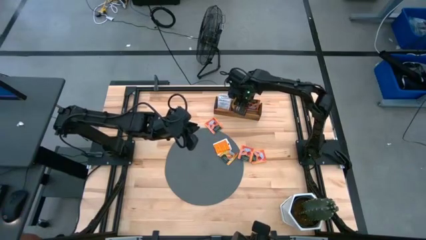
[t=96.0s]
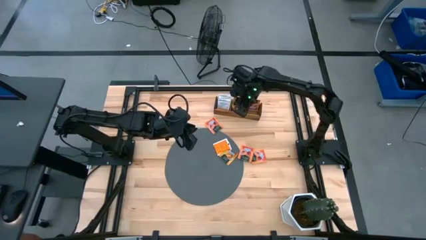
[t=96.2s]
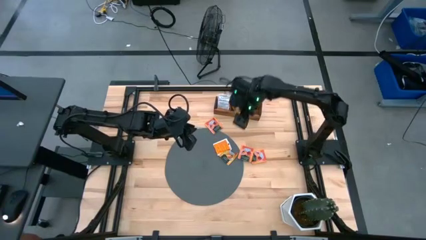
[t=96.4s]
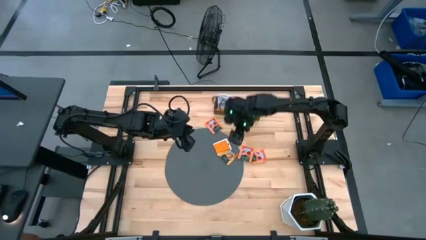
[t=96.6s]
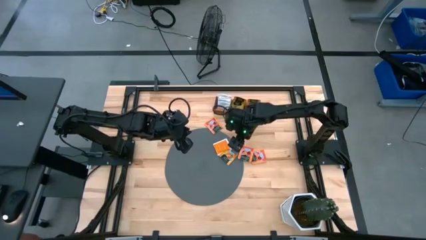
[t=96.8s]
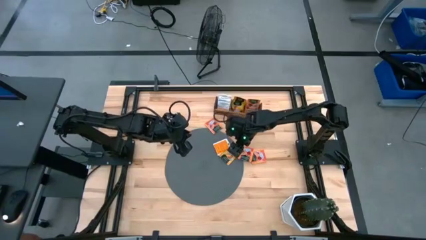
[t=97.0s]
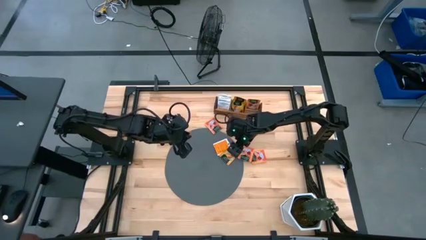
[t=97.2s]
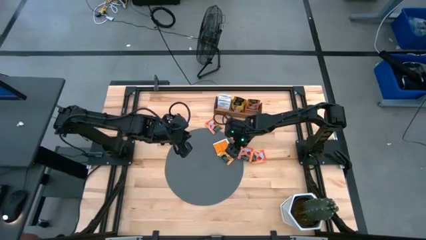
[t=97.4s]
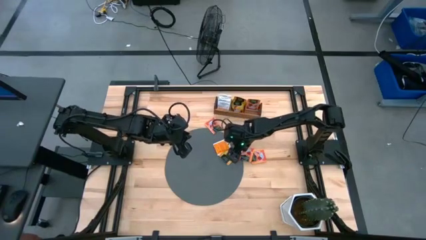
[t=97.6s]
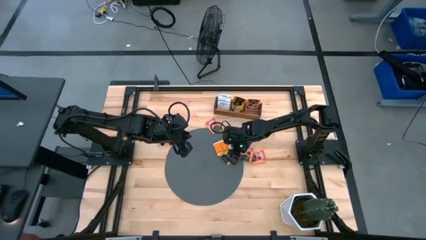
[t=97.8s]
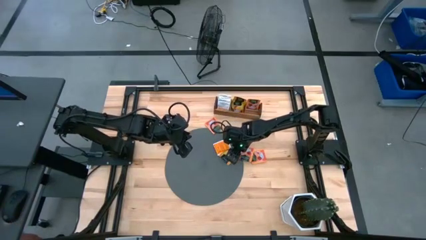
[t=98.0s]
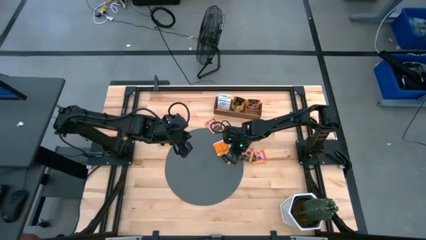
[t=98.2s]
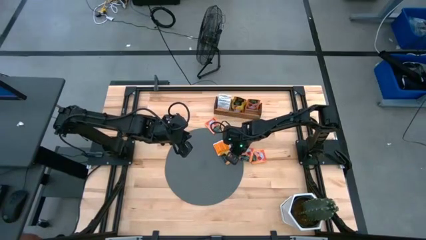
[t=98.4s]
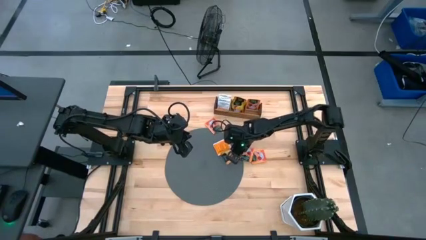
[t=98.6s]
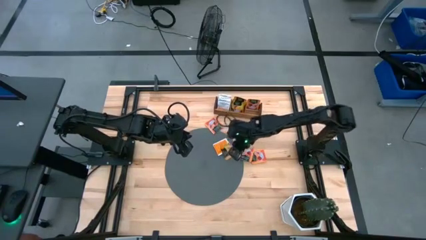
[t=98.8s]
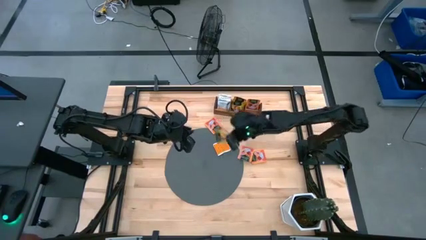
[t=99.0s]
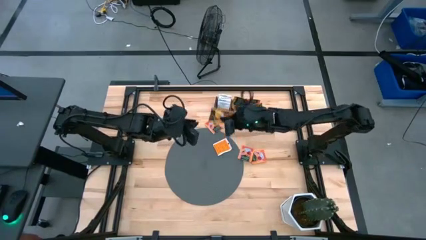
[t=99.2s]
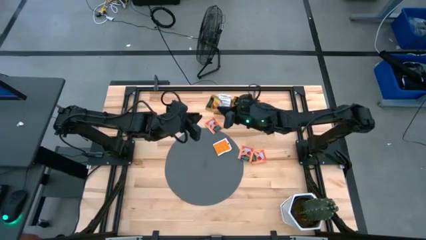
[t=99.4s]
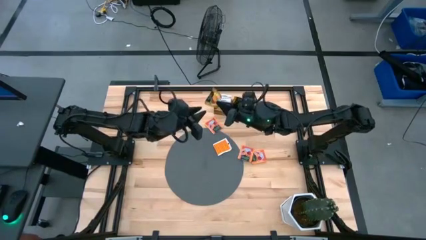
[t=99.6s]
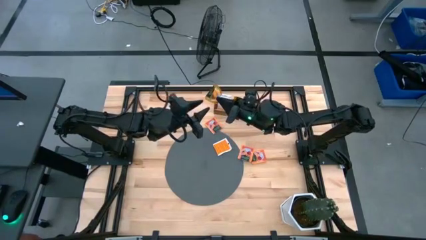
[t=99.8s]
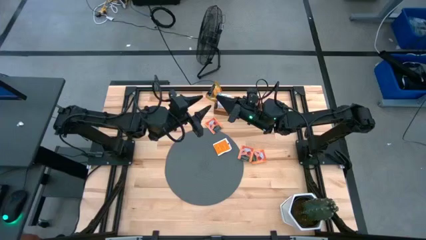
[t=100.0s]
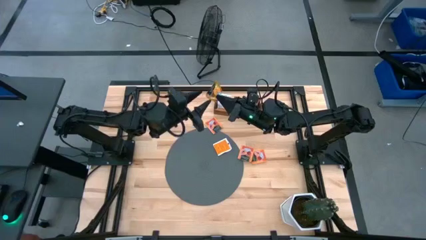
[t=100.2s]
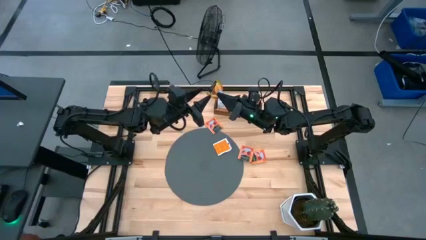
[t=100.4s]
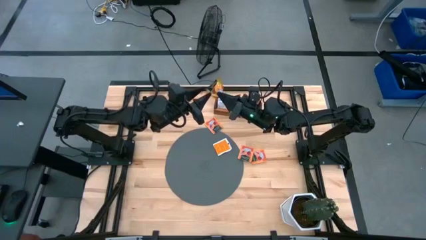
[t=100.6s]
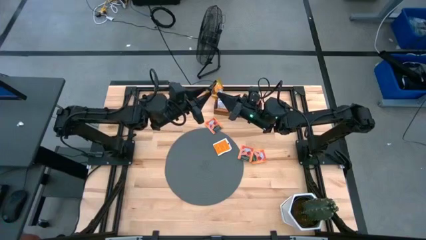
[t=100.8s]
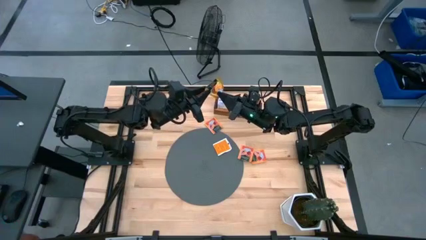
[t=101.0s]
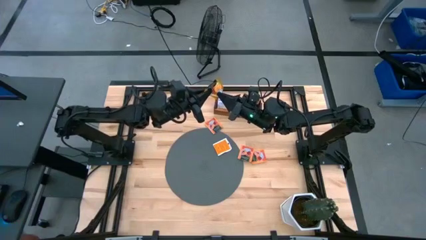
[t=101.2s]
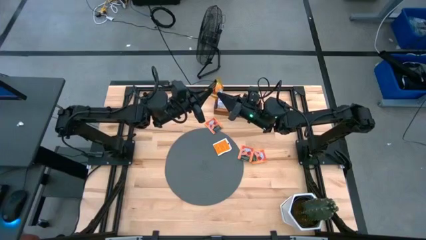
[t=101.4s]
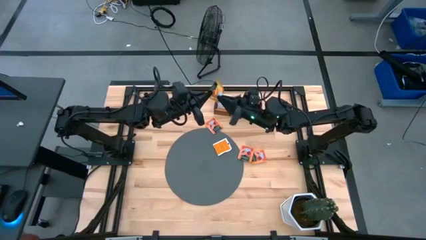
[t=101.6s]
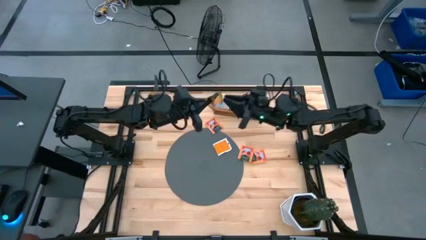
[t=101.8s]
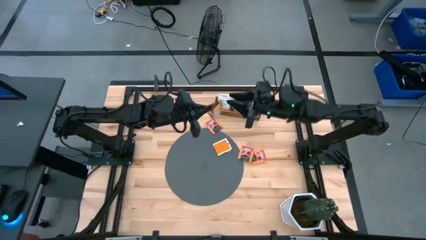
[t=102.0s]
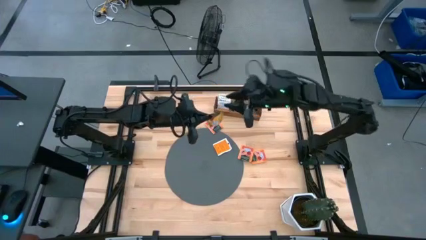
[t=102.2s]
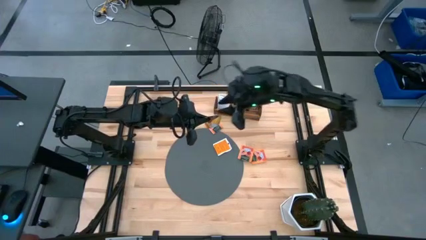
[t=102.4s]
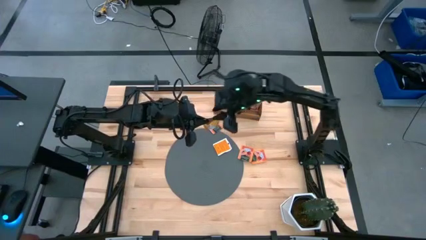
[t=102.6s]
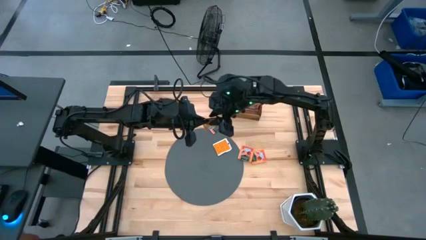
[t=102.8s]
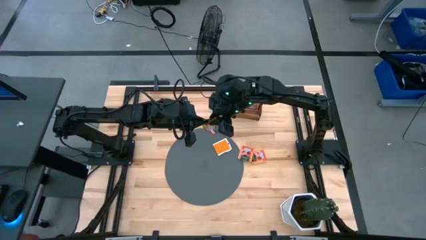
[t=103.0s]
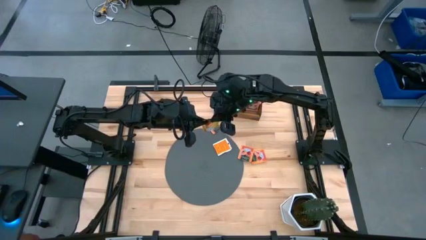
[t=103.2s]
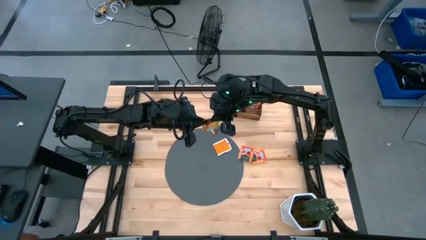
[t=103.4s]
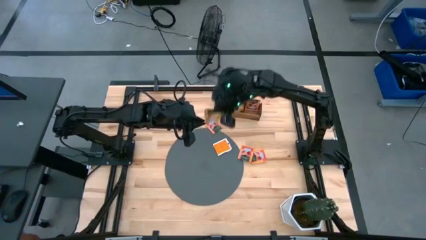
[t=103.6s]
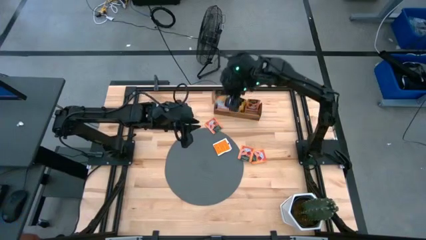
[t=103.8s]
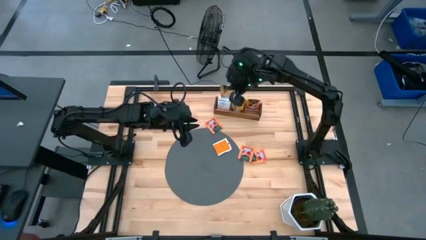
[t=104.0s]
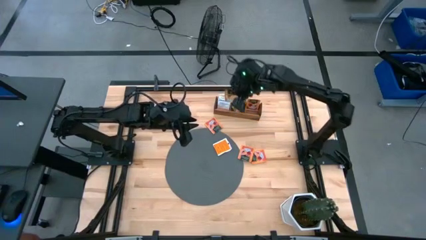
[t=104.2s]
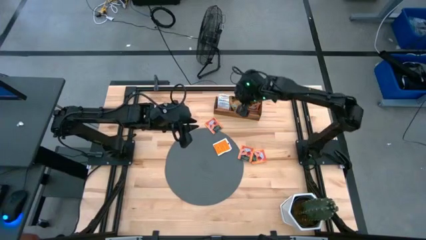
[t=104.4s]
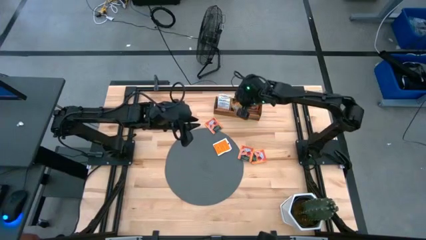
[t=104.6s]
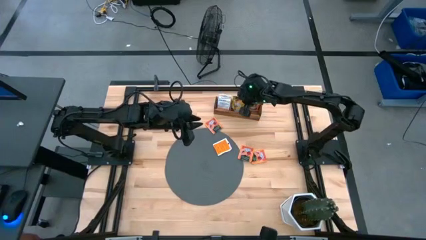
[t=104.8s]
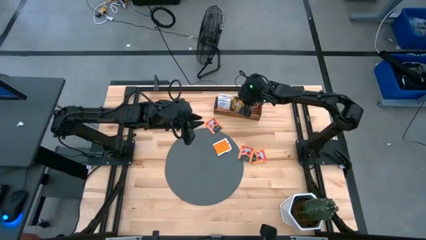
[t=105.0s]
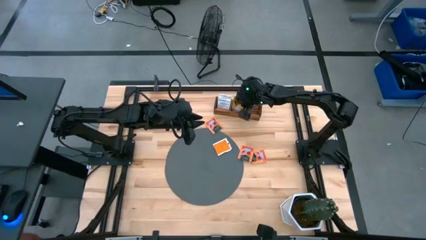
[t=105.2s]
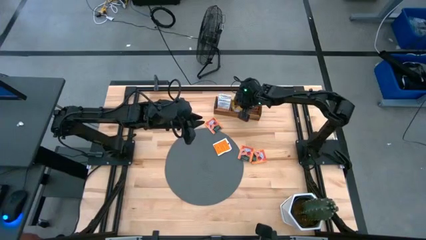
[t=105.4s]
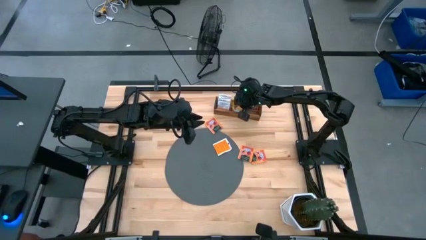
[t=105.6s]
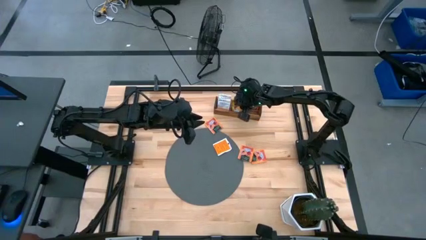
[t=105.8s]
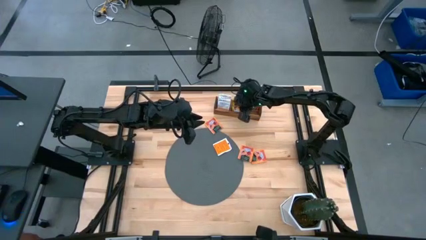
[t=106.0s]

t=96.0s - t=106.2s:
Task: Pick & Place Tea
Put the yellow tea bag into the middle section of the wooden organizer

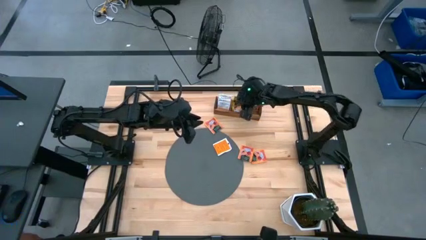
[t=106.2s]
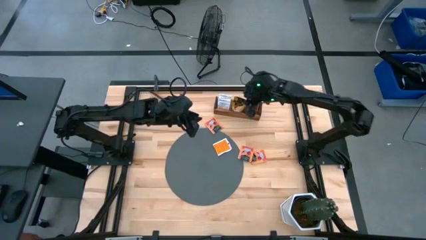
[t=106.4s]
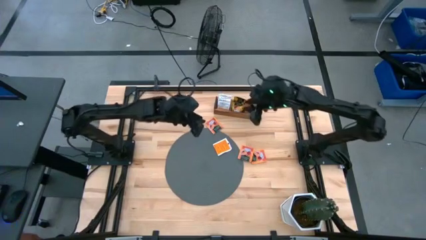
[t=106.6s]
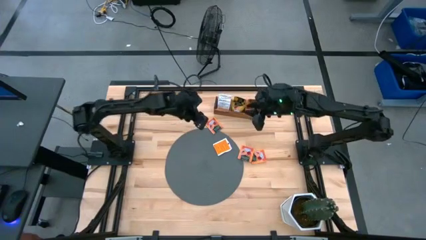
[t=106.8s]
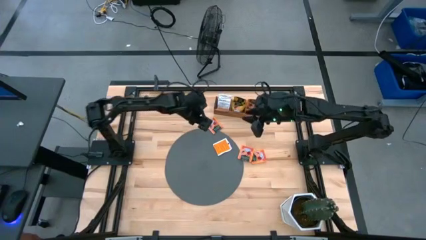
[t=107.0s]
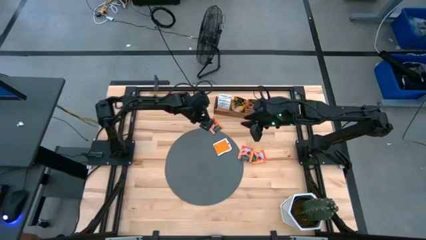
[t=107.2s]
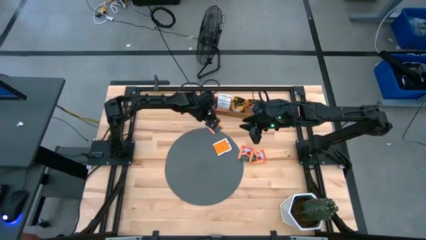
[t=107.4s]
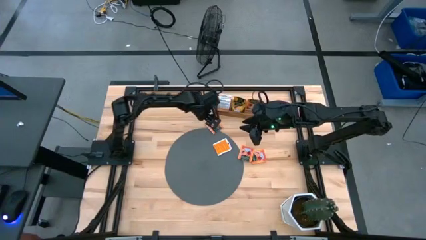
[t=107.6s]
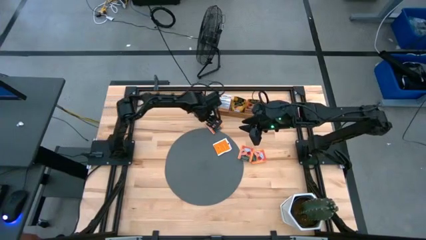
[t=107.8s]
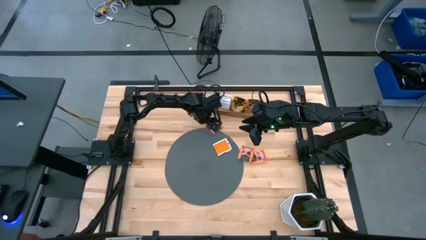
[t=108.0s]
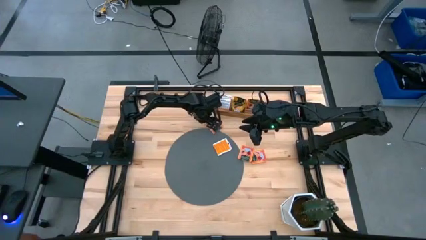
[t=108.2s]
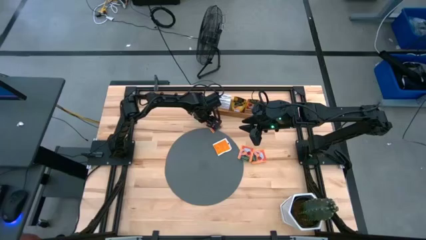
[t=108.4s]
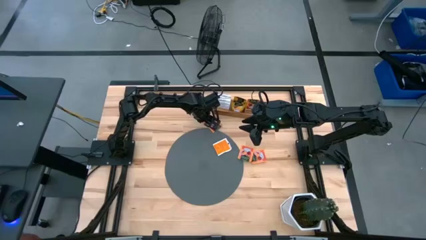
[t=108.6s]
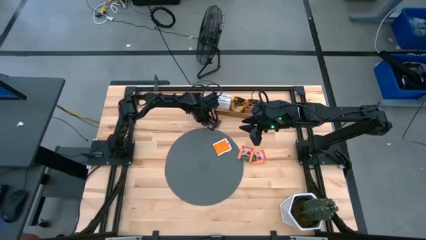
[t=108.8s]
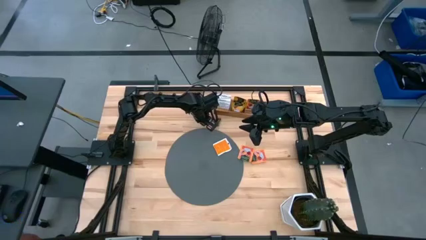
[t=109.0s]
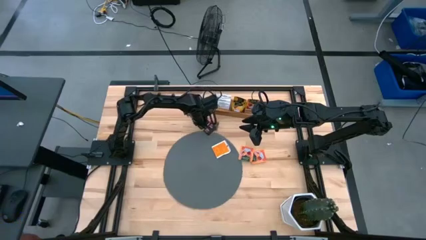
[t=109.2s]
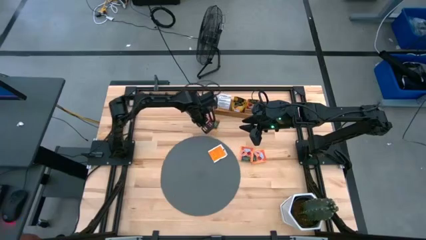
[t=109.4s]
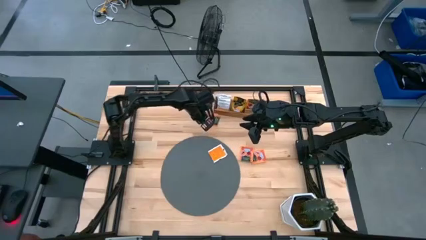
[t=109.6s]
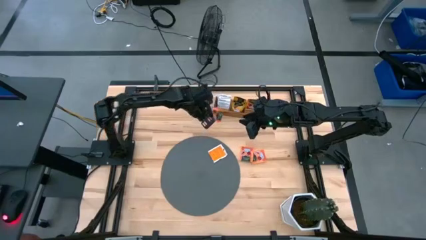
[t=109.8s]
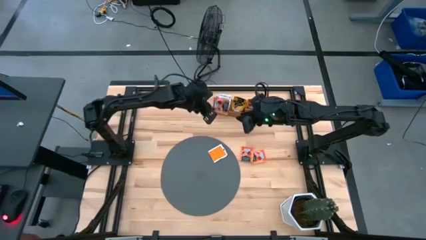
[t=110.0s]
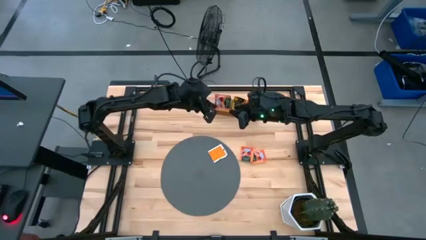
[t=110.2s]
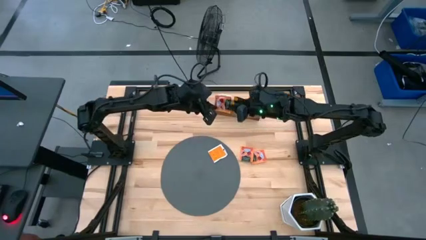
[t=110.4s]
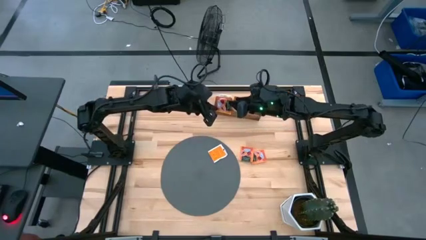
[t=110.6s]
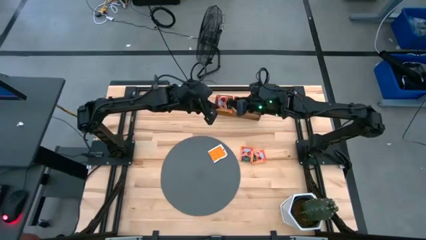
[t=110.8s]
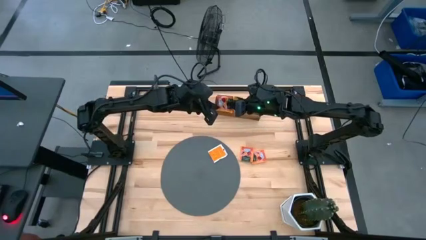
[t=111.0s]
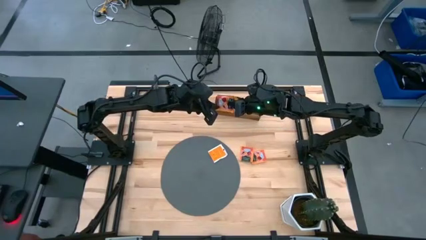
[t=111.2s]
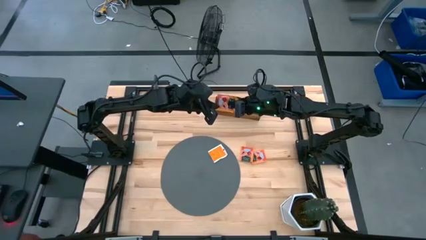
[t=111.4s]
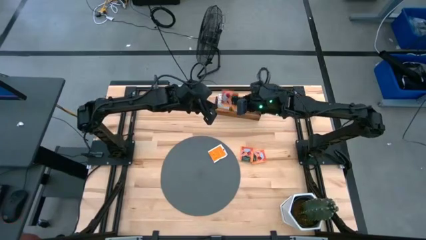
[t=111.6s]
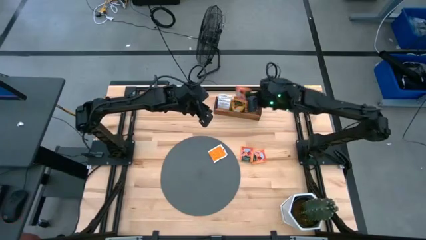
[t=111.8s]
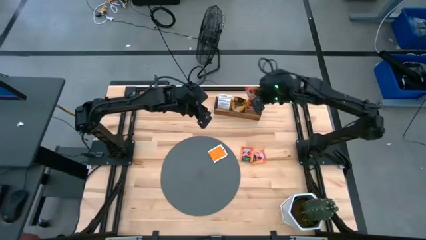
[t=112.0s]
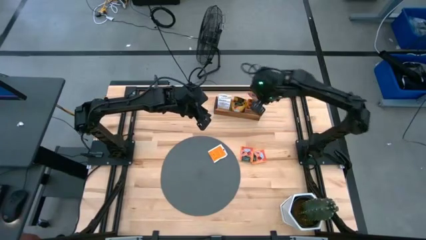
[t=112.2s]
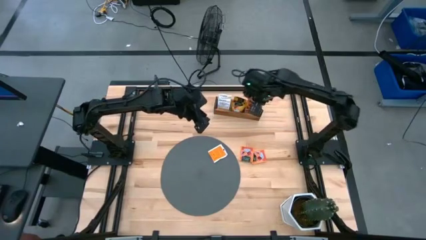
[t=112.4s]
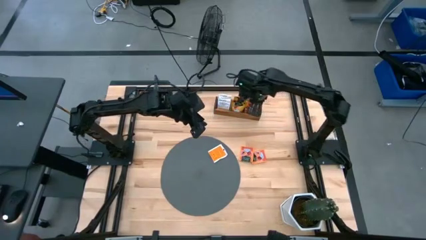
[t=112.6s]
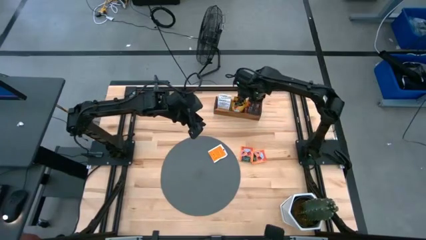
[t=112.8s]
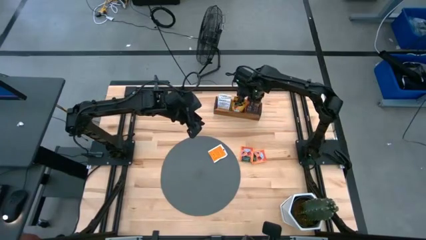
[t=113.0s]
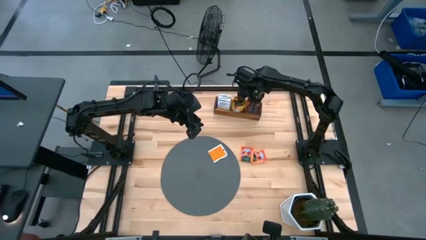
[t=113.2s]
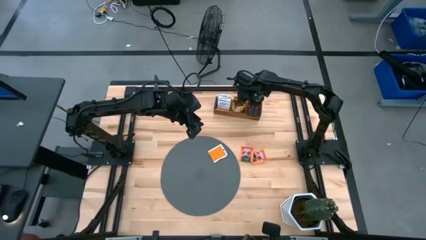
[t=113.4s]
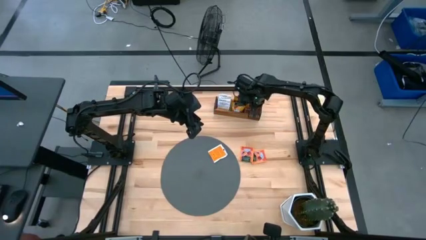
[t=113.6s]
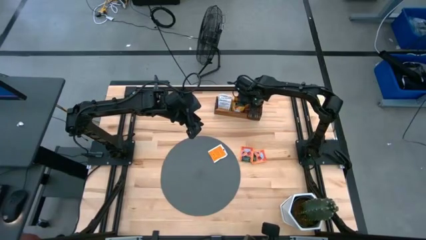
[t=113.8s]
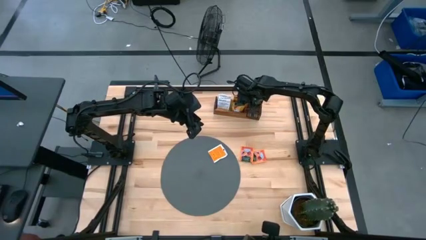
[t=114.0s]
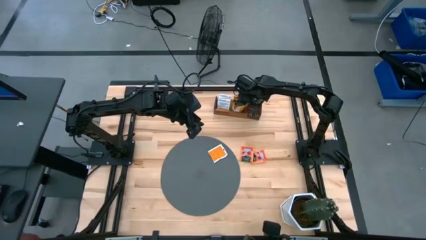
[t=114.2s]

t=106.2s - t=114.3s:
Put the orange tea bag into the right section of the wooden organizer
